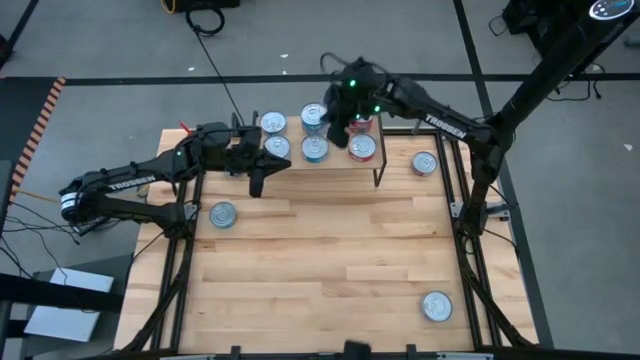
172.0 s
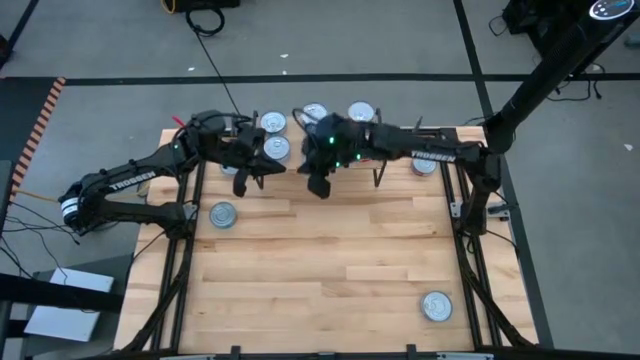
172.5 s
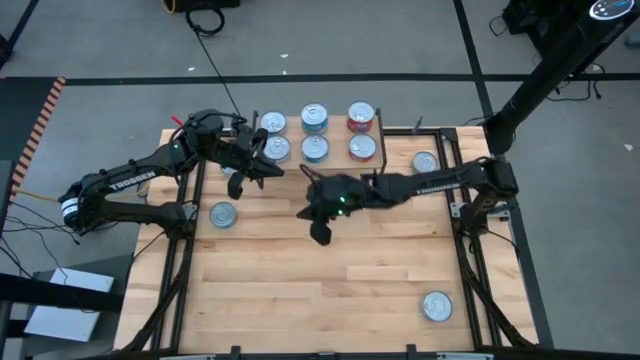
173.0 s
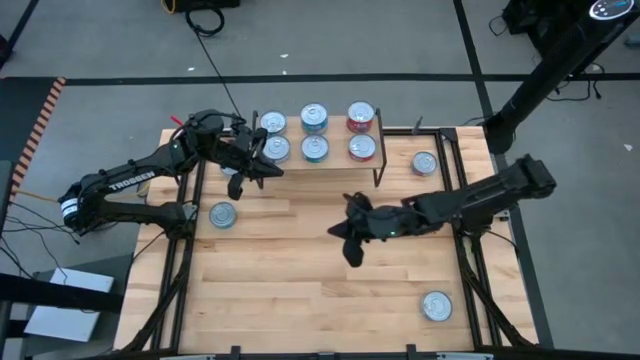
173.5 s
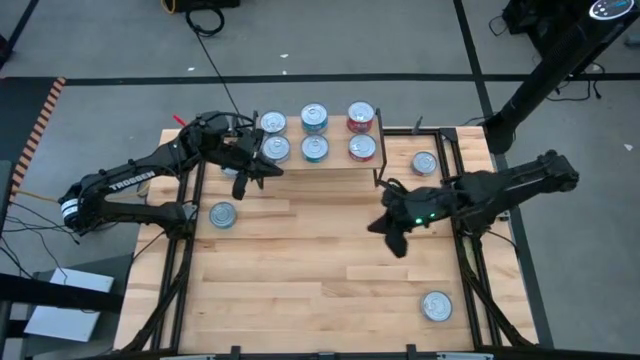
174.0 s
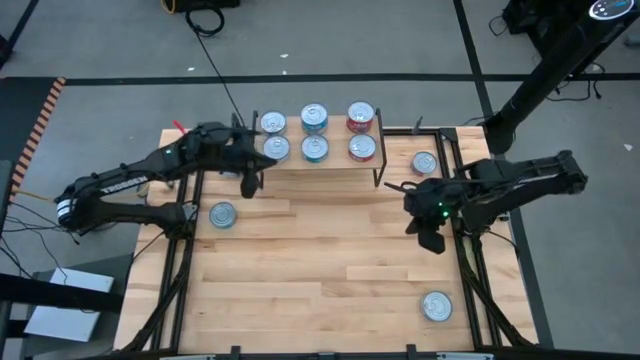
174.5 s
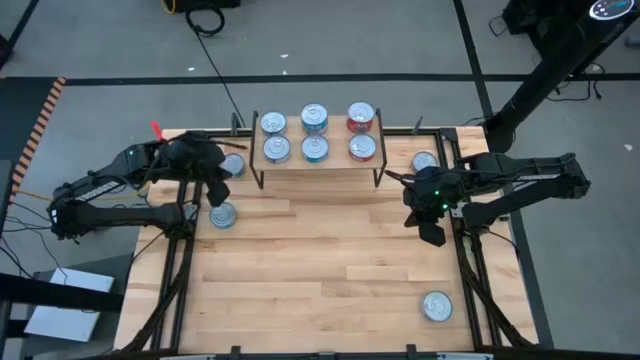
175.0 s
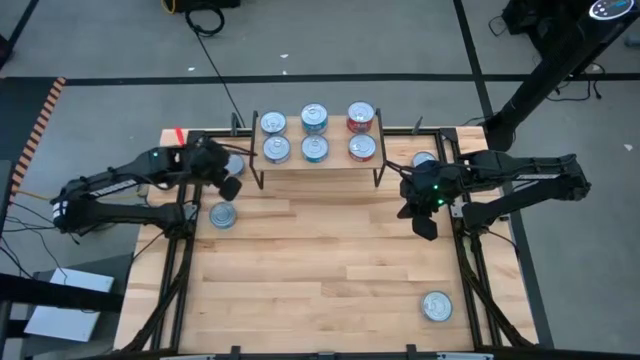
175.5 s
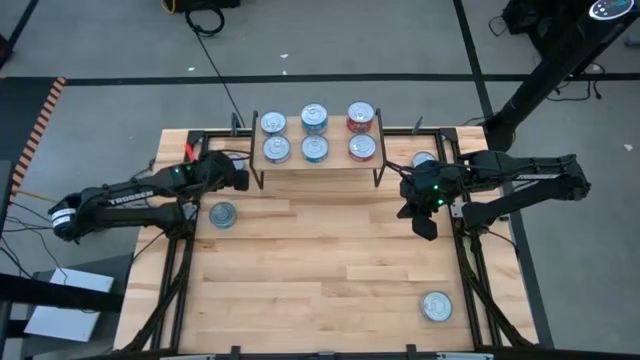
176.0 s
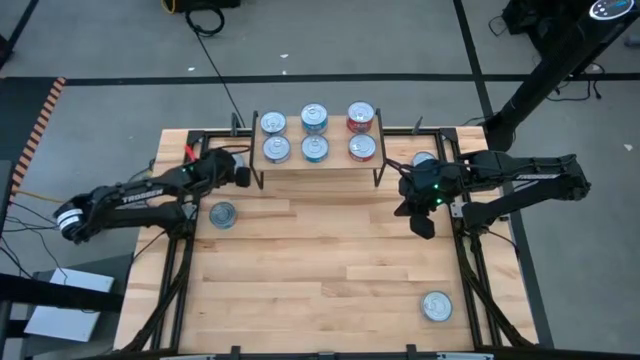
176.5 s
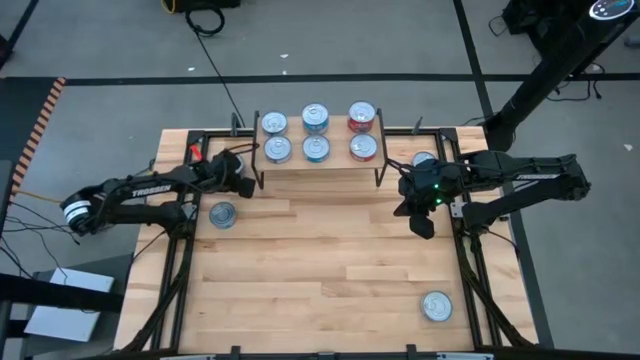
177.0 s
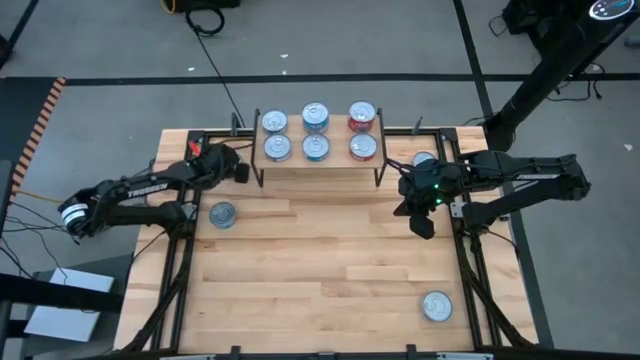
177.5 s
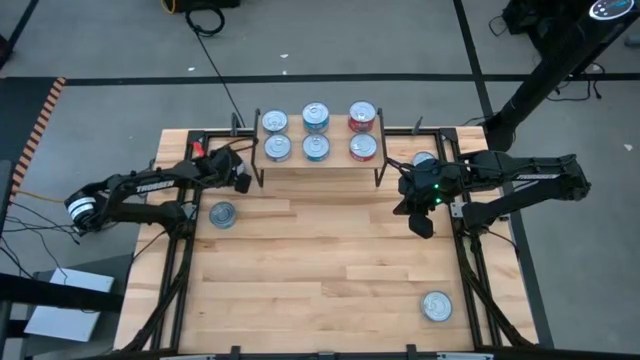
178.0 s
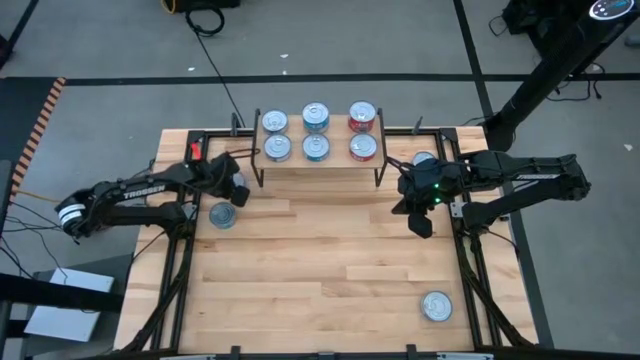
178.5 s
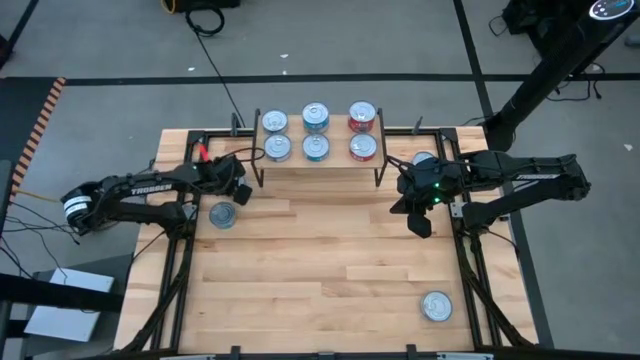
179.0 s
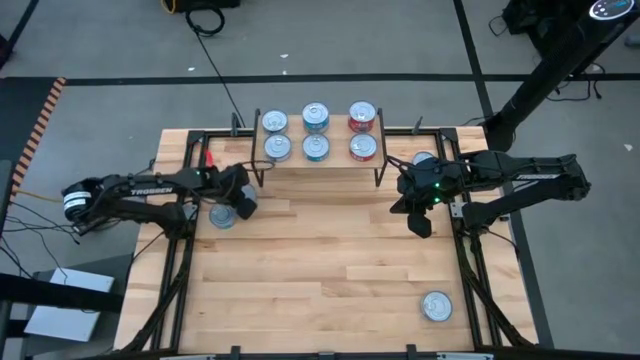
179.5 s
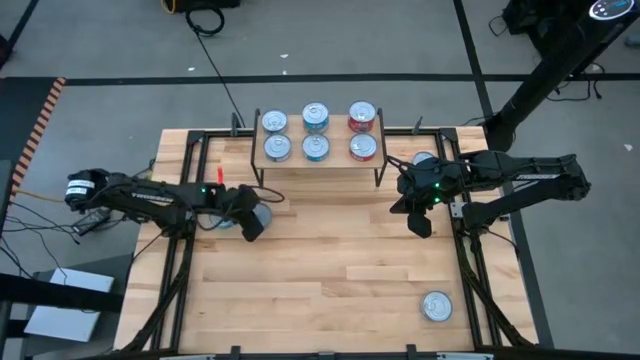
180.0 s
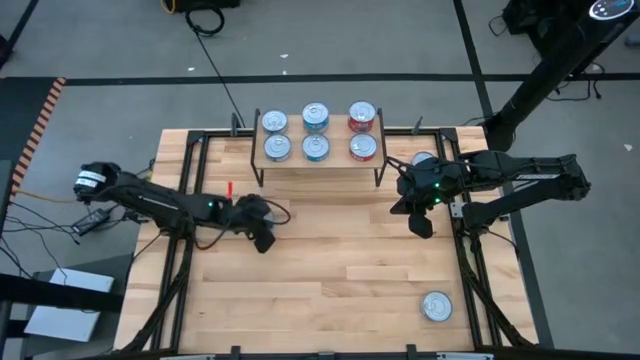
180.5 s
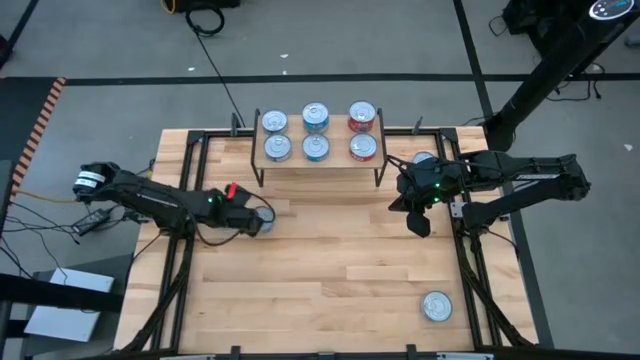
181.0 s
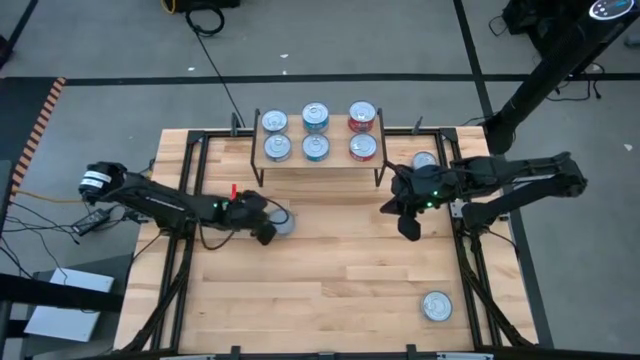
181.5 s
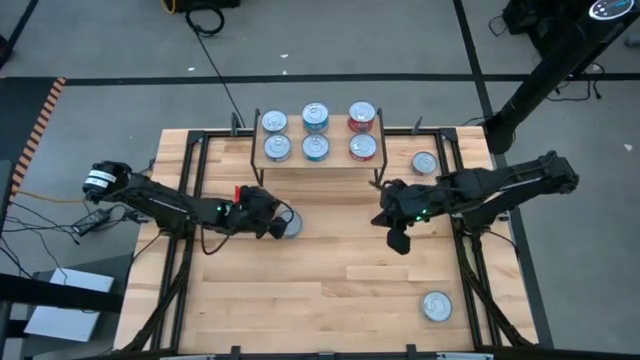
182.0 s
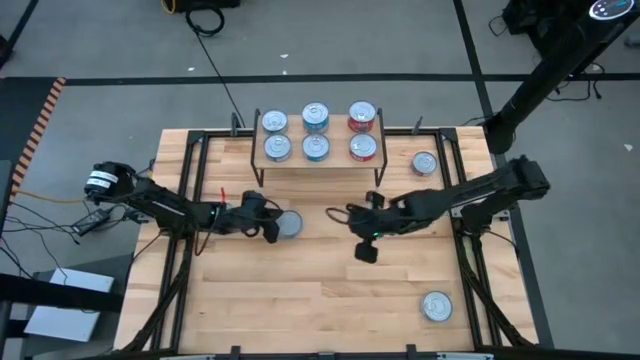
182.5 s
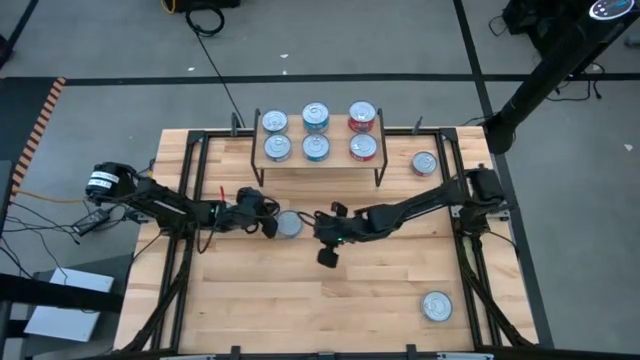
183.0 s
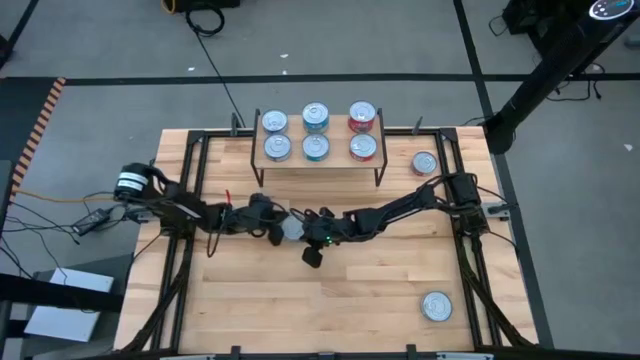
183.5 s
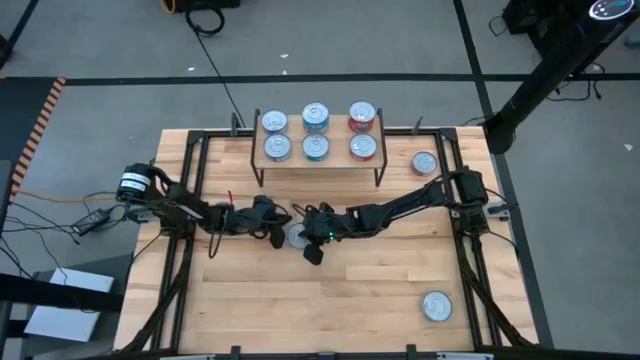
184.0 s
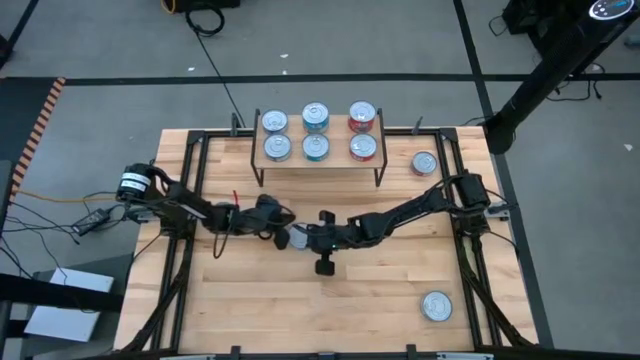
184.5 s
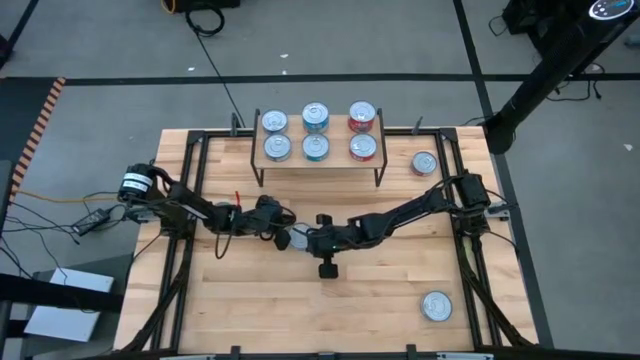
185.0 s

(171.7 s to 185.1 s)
Task: Stack canned seafood by type on shelf
Stack the blue tuna can on top of the other blue can on the shelf

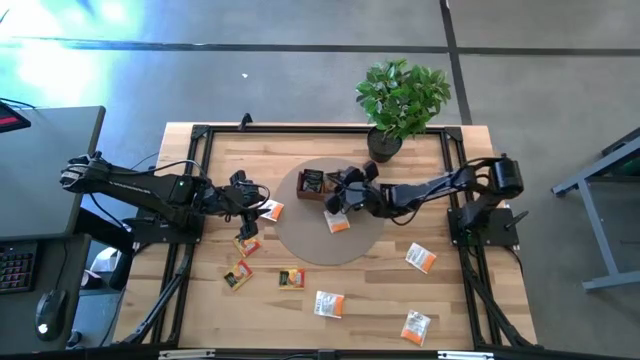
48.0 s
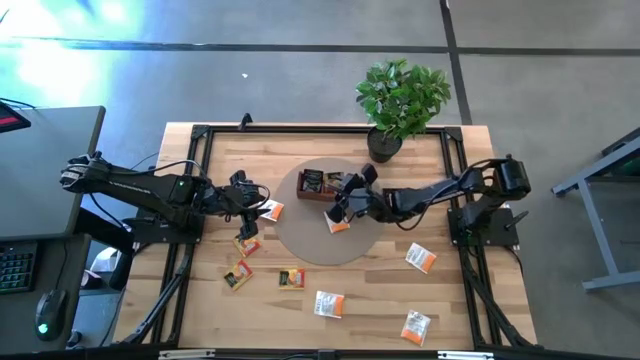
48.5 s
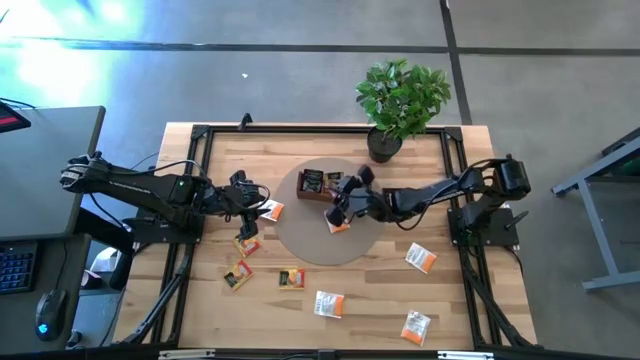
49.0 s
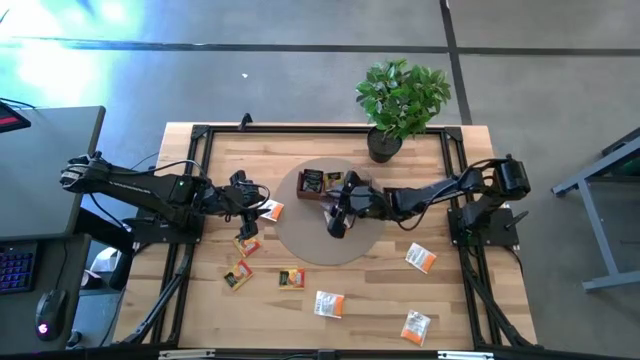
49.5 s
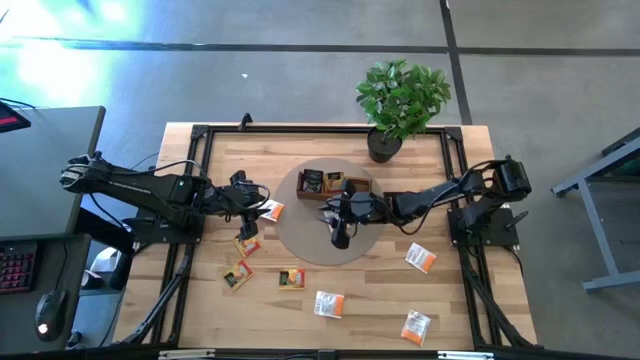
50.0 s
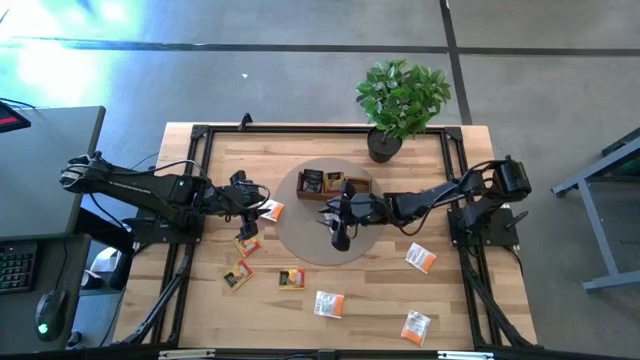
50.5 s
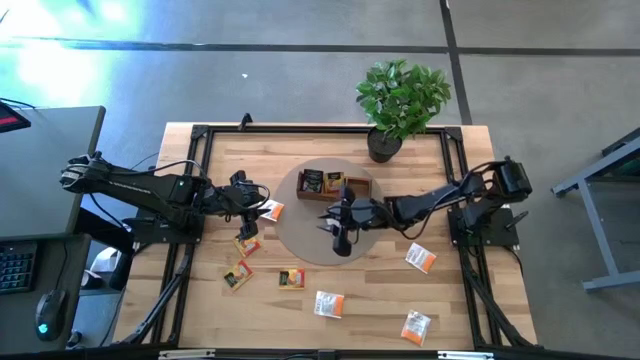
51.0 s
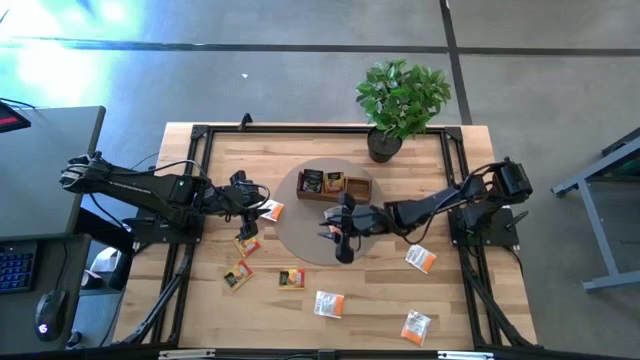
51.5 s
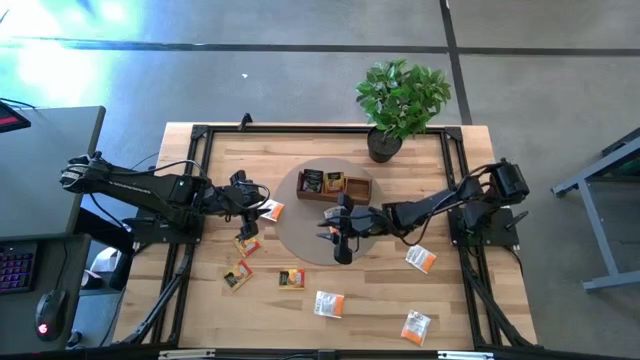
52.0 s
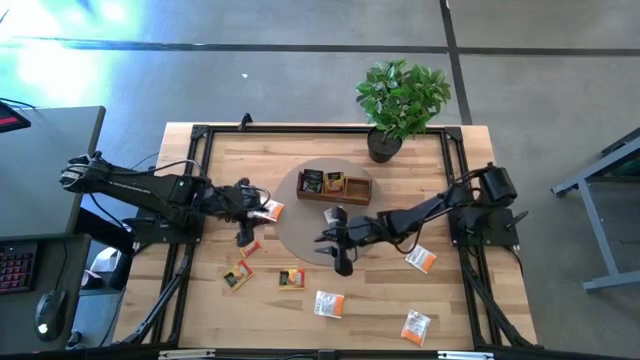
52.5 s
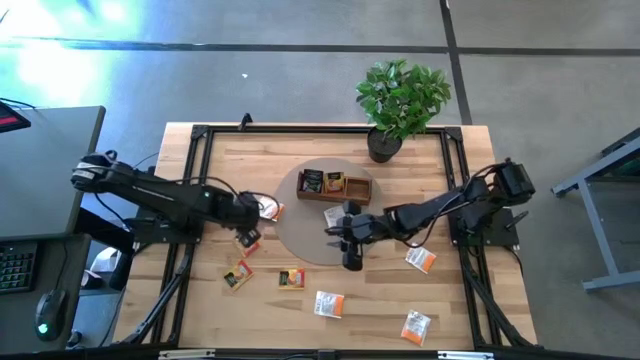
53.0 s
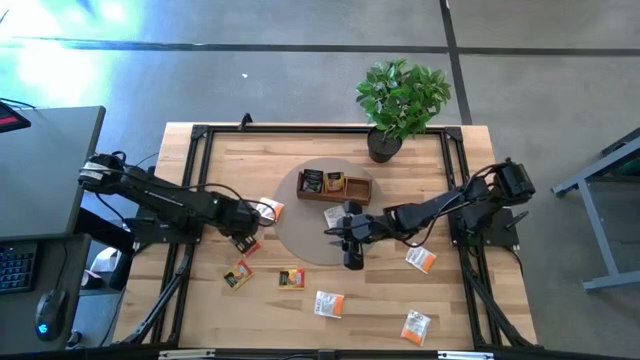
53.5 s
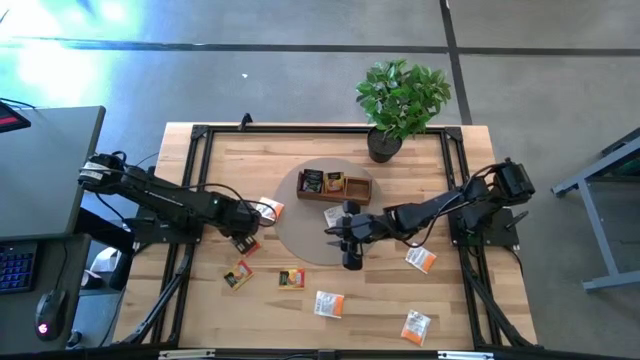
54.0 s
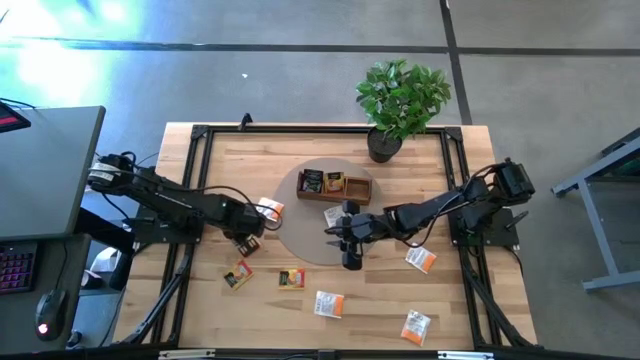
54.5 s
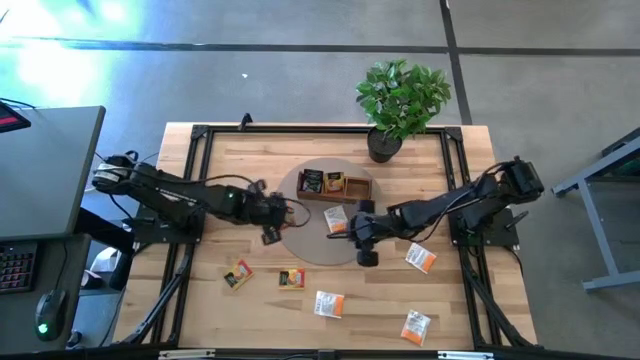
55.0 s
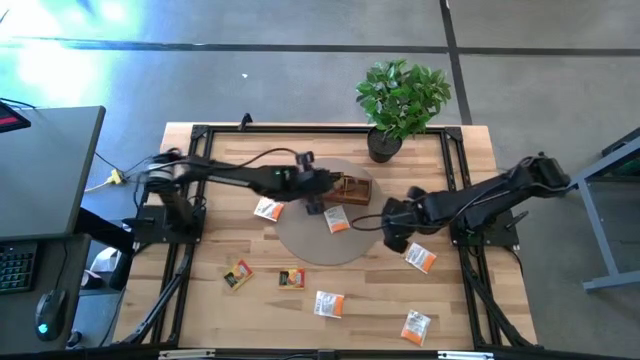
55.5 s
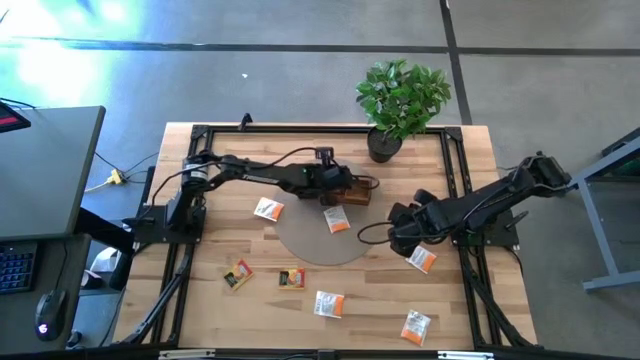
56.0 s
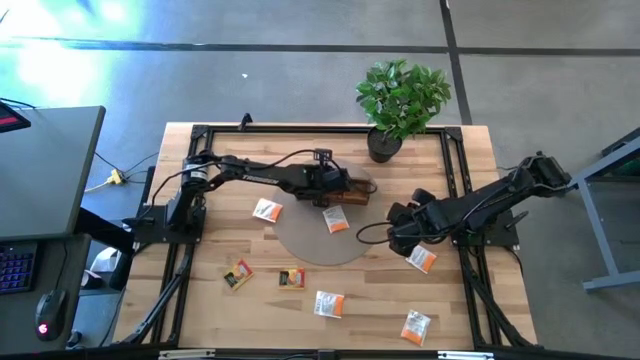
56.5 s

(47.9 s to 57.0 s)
Task: Pick & Place Tea
Put the orange tea bag into the middle area of the wooden organizer
